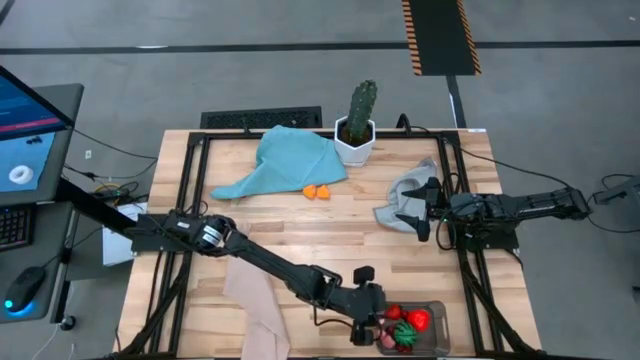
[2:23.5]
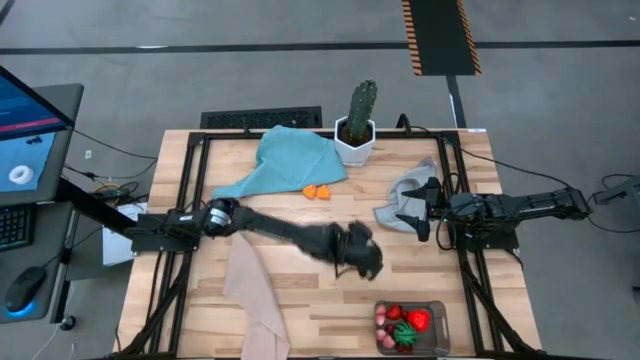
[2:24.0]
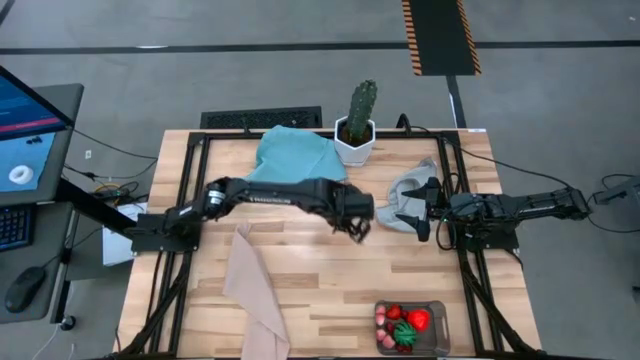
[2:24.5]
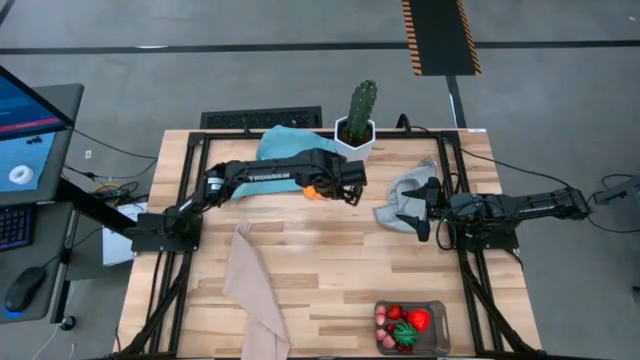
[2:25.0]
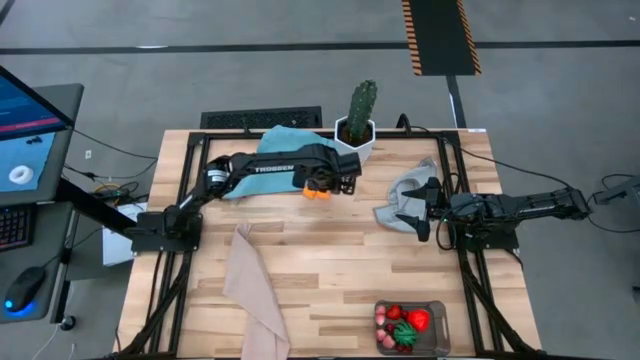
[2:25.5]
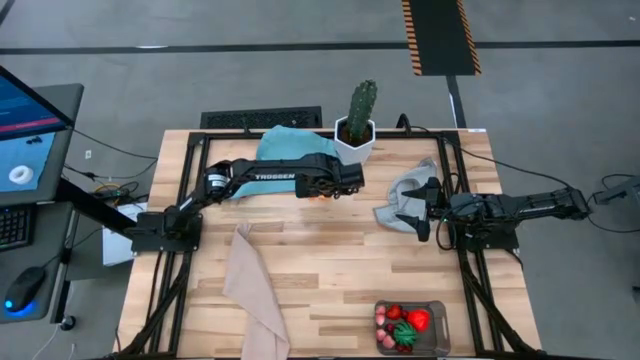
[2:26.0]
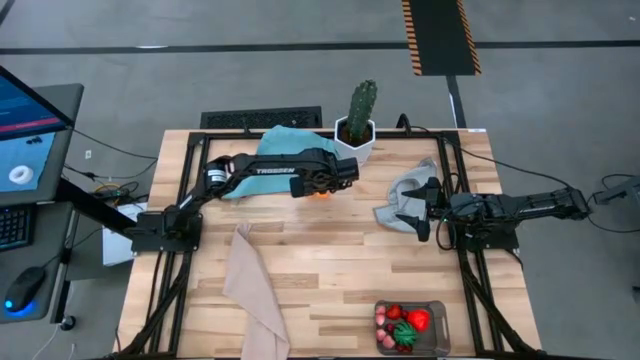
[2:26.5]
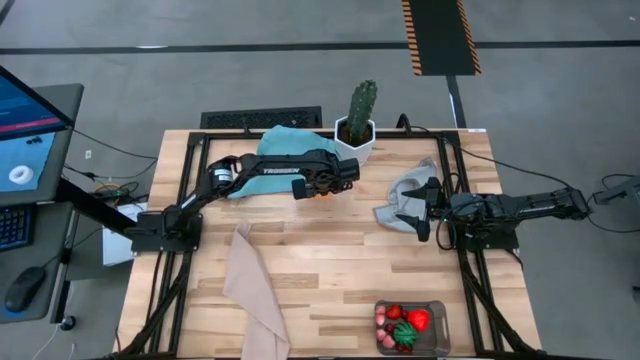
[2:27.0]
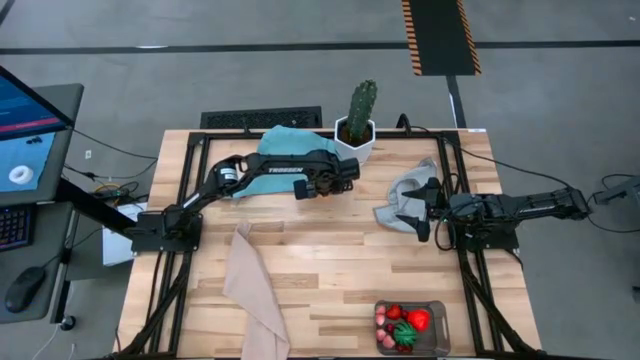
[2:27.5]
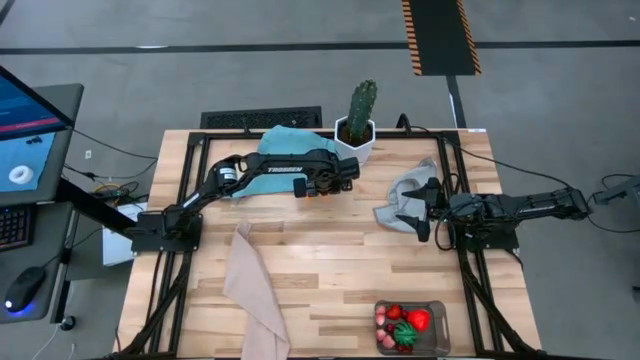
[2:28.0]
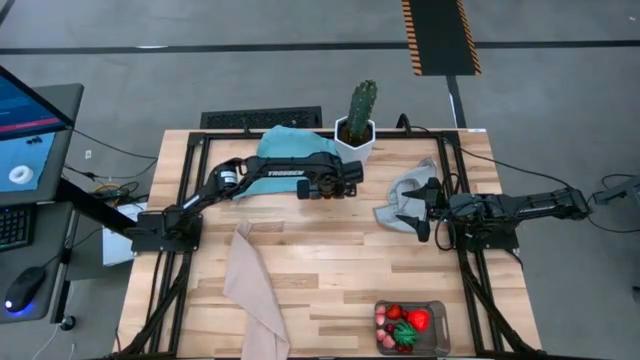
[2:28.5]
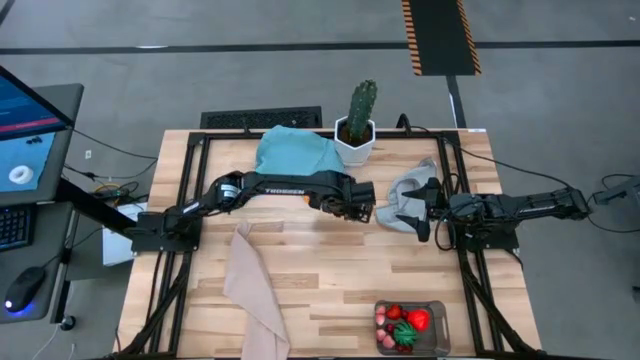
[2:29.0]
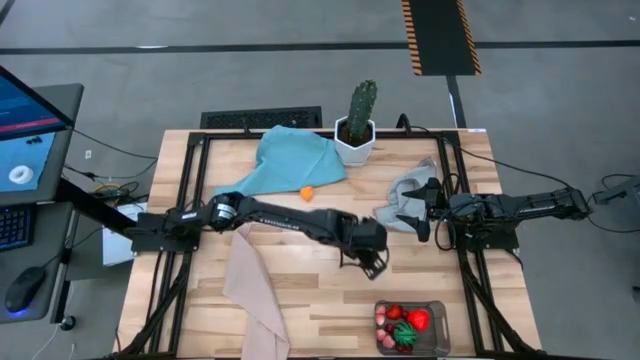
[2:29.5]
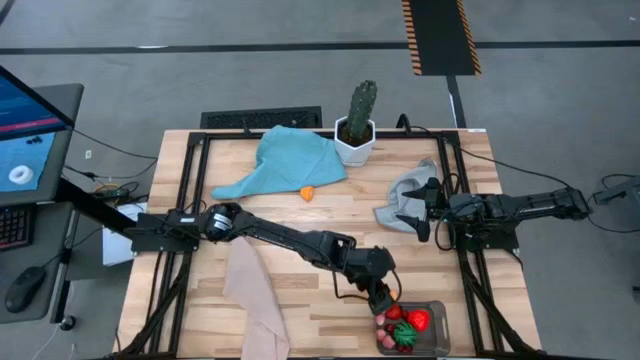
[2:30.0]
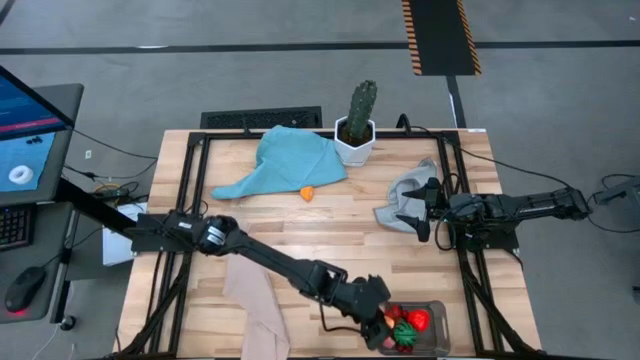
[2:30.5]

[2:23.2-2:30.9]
Task: Pick and placing Produce into tupperware
Put the croissant into the black bin

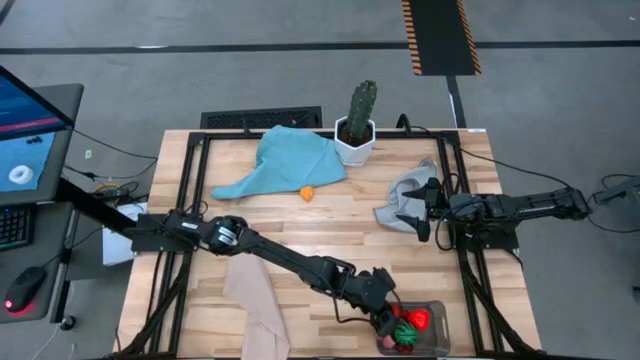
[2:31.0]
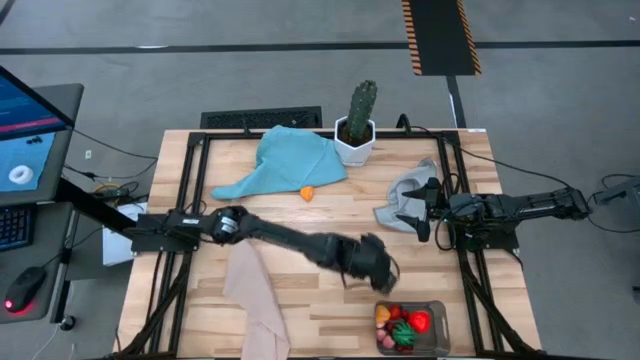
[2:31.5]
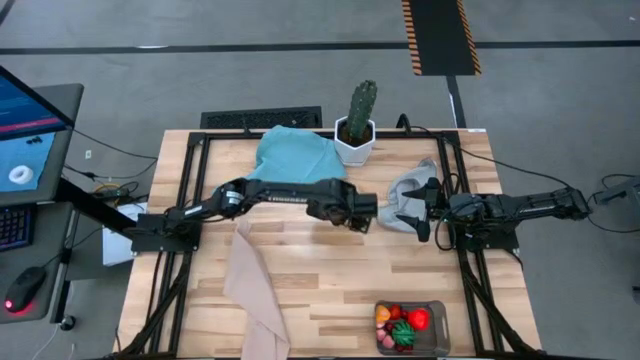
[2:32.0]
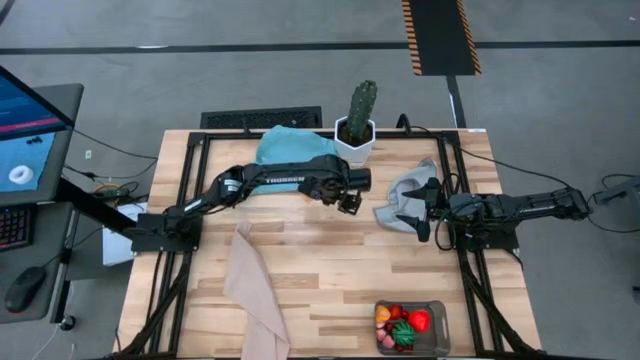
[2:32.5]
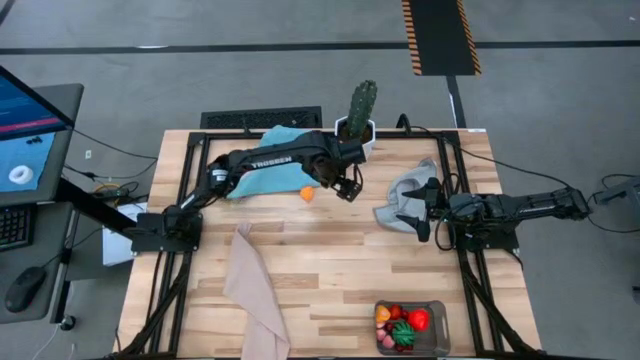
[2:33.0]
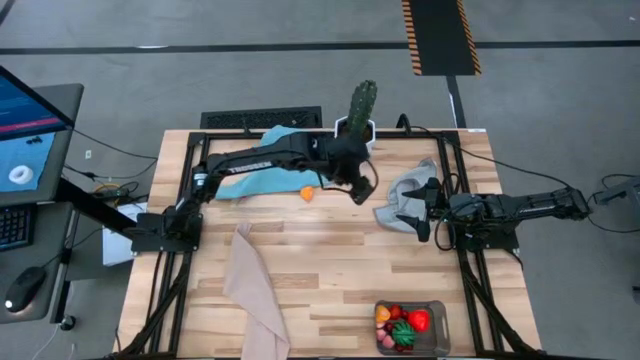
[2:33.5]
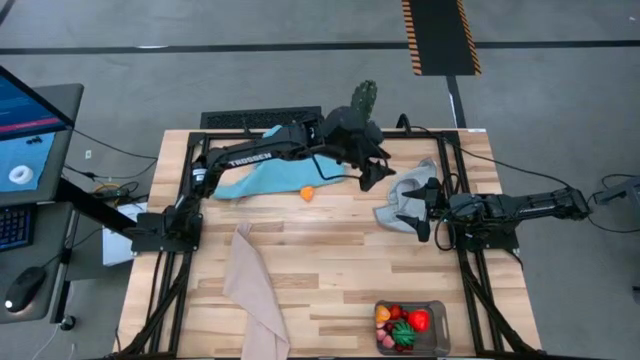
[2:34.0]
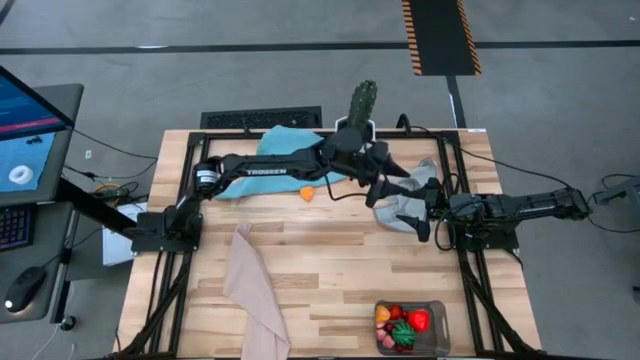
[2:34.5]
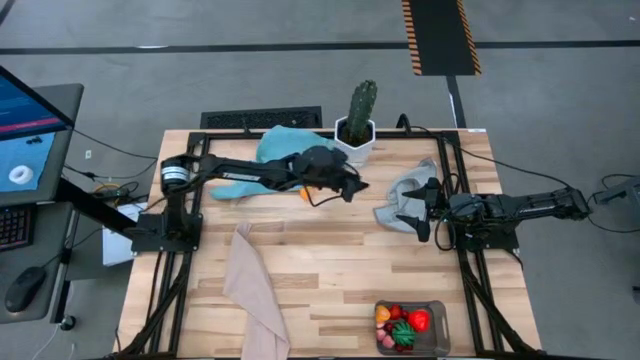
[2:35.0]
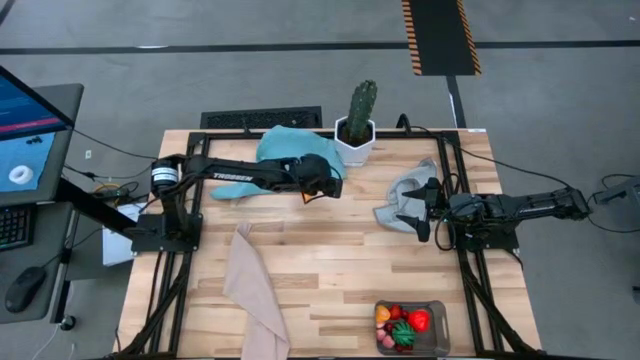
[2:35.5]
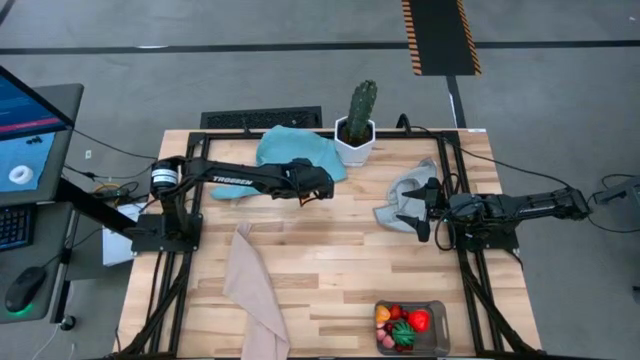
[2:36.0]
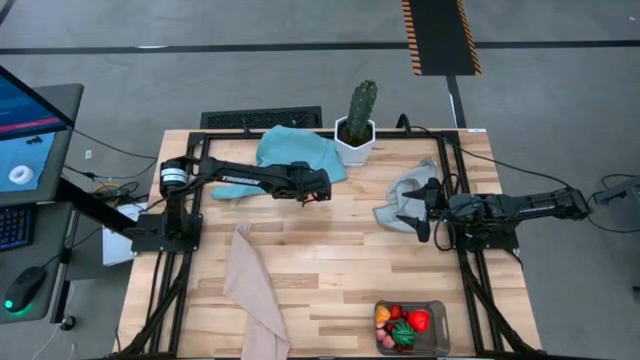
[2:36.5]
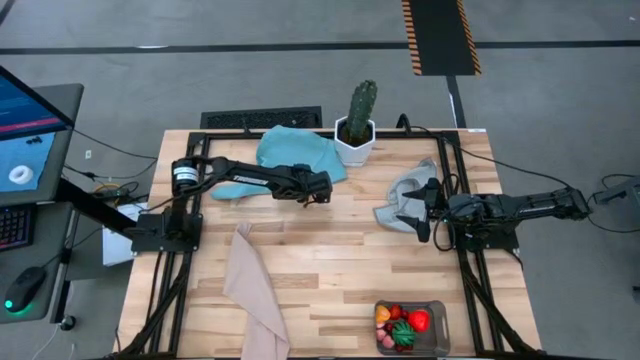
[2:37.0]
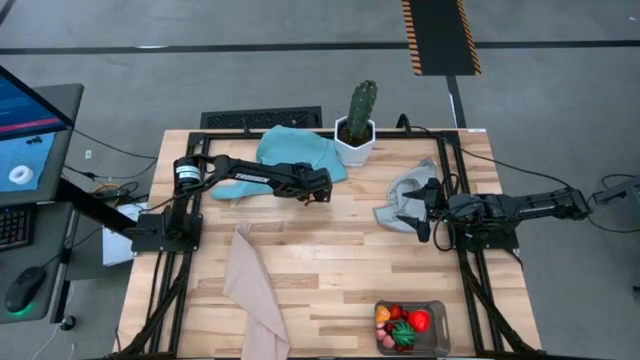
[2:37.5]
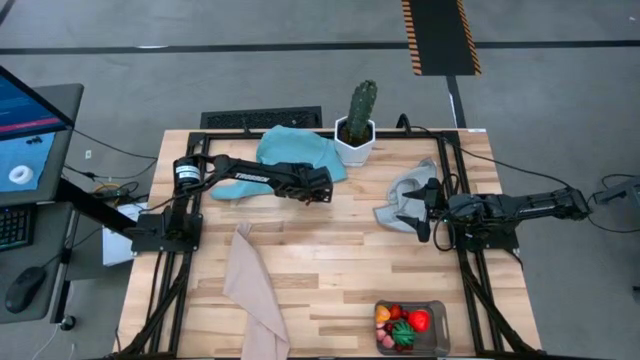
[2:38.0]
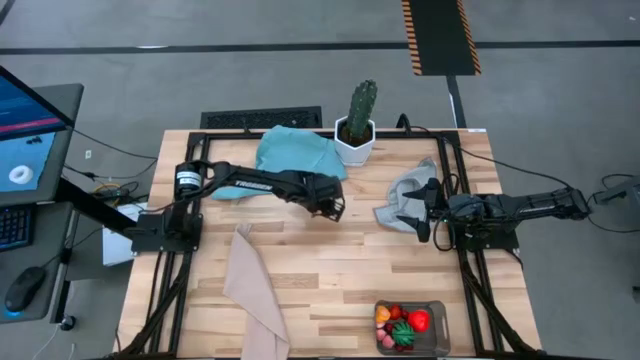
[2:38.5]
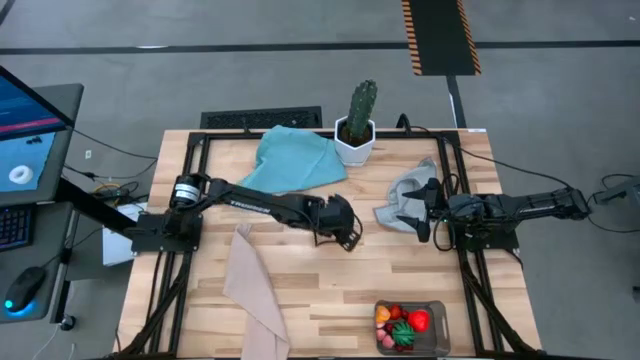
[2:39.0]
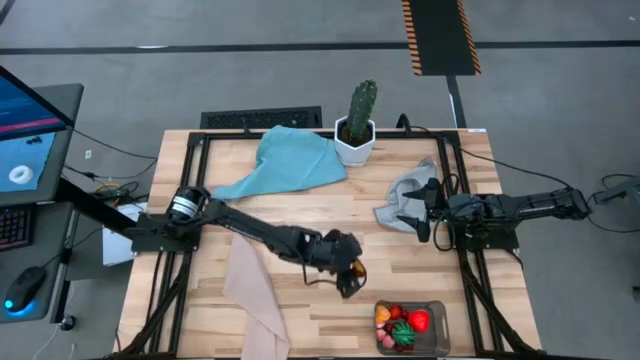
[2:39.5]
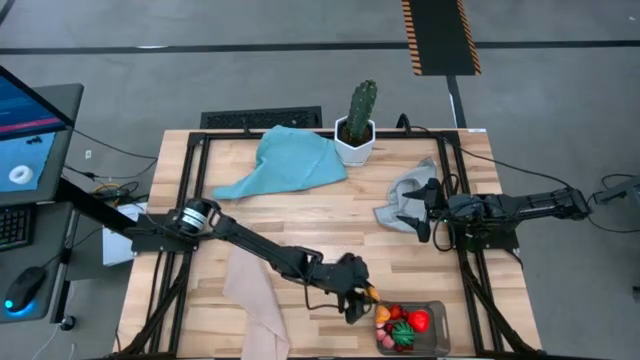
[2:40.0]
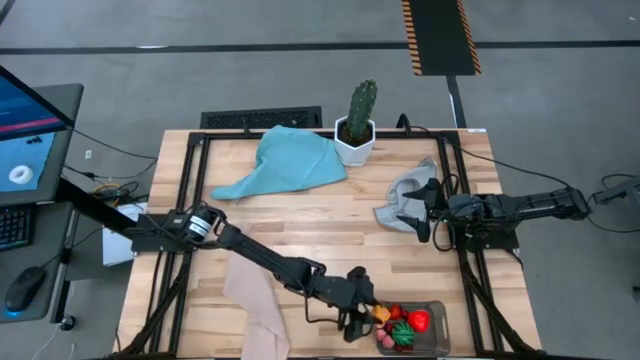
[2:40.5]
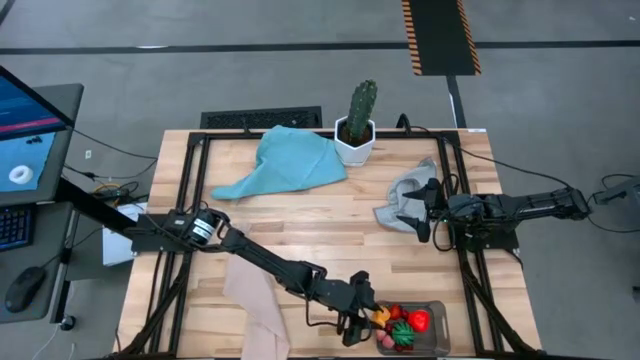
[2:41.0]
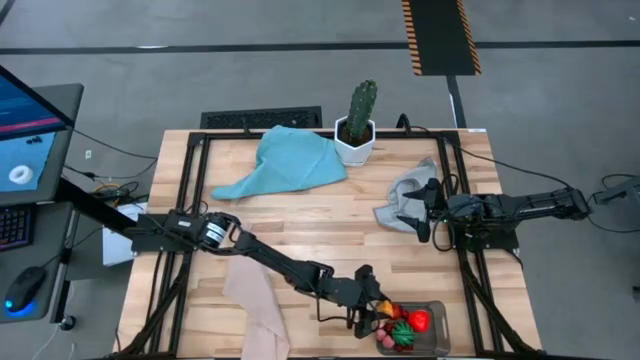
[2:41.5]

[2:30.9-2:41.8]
Put the croissant into the black bin

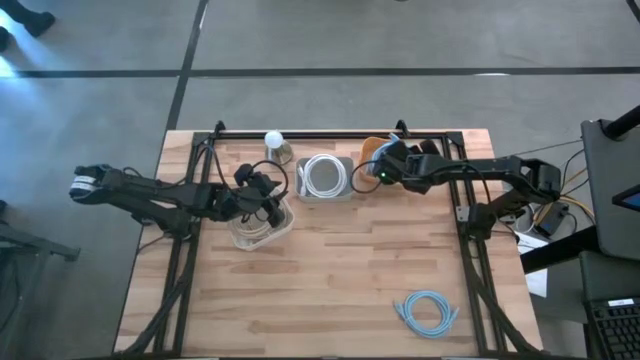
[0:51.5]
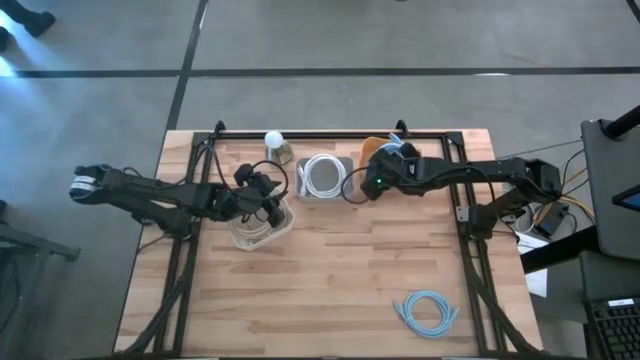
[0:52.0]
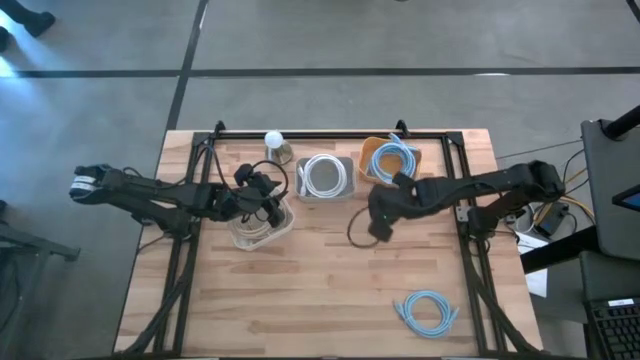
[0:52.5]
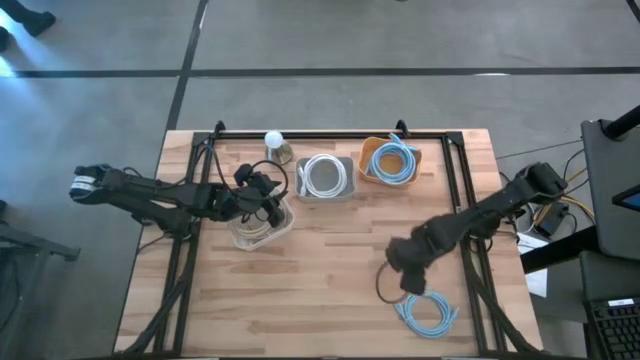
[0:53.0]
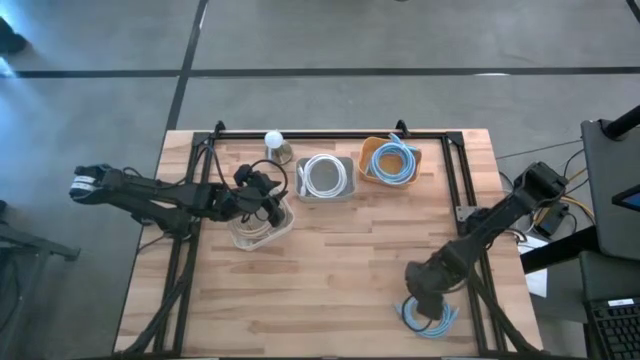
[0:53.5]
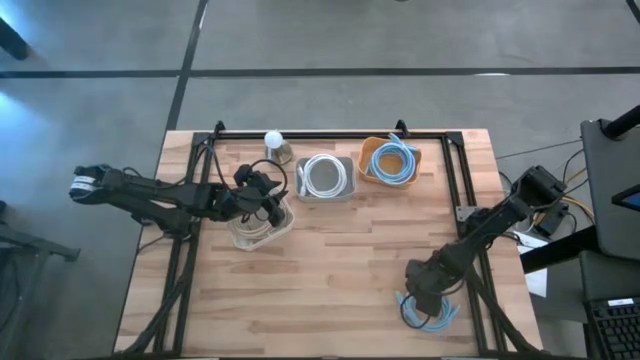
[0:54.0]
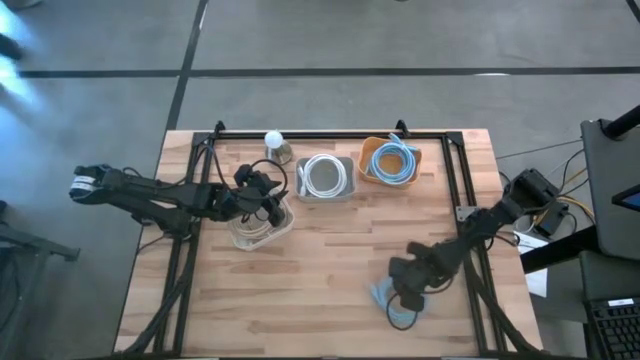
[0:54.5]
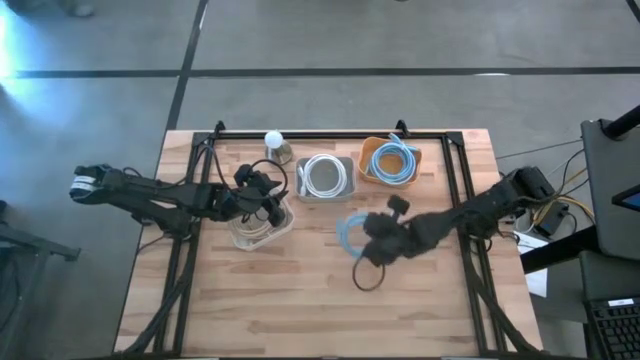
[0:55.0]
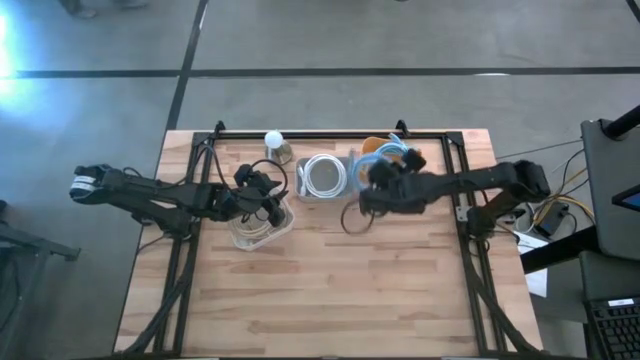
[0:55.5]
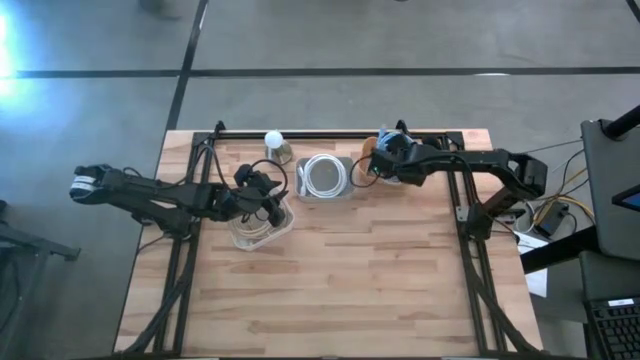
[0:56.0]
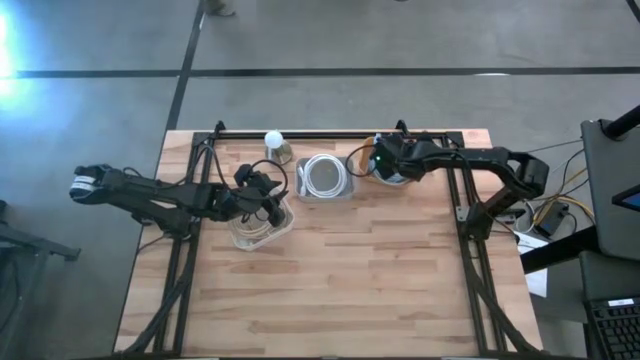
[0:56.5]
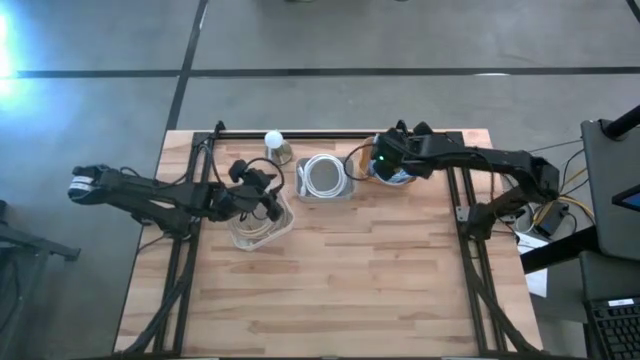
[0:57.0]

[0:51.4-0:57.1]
Task: Sort HDMI cables
Put the blue HDMI cable into the yellow bin
